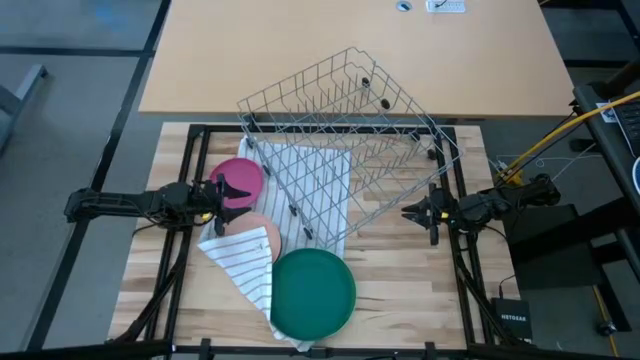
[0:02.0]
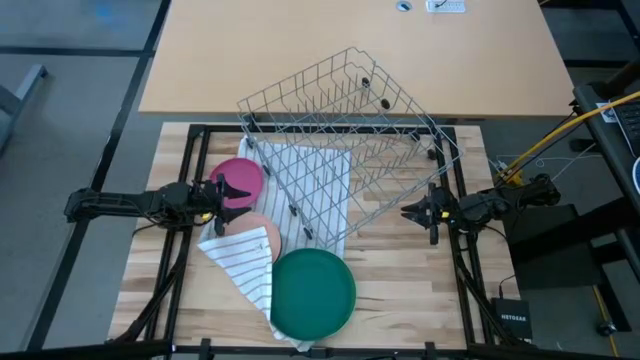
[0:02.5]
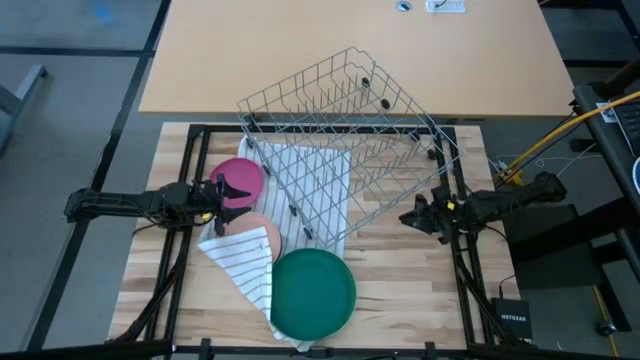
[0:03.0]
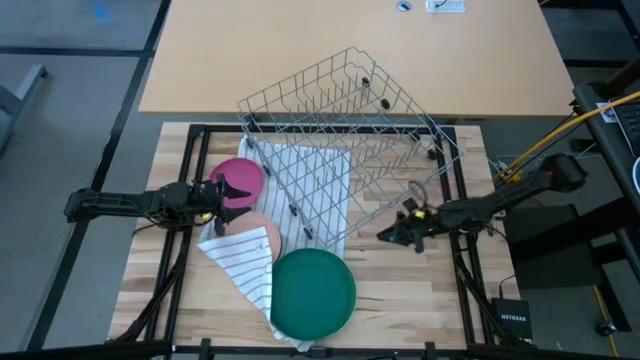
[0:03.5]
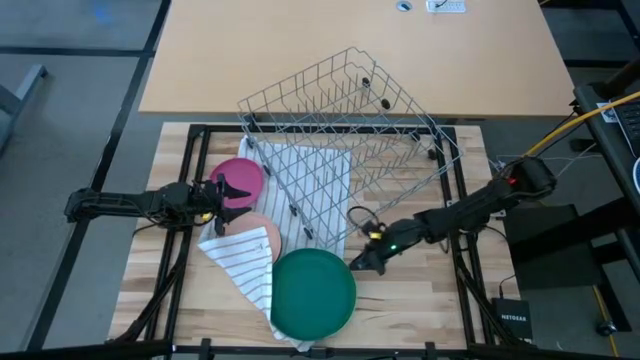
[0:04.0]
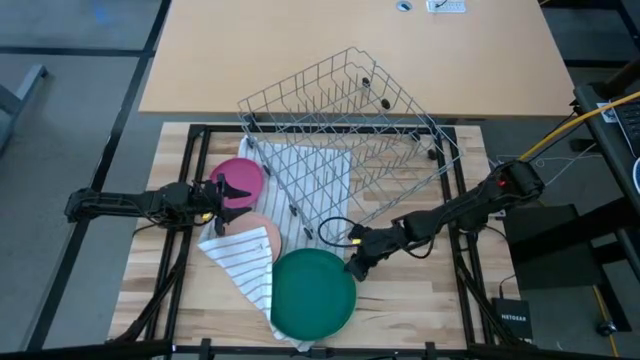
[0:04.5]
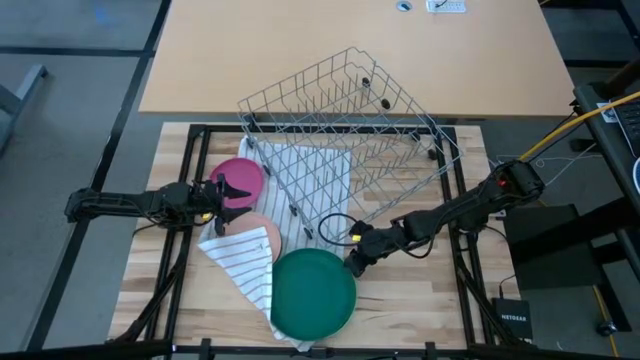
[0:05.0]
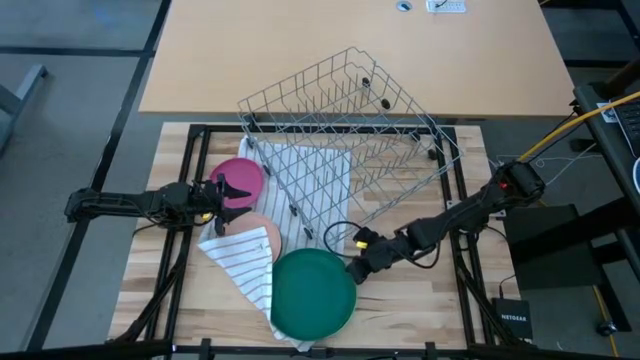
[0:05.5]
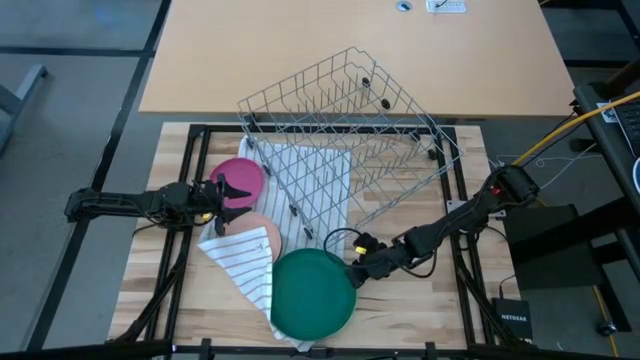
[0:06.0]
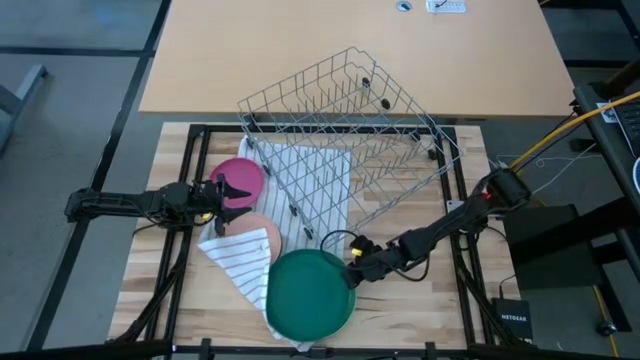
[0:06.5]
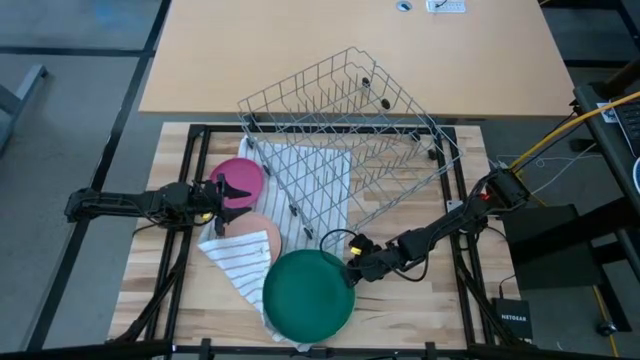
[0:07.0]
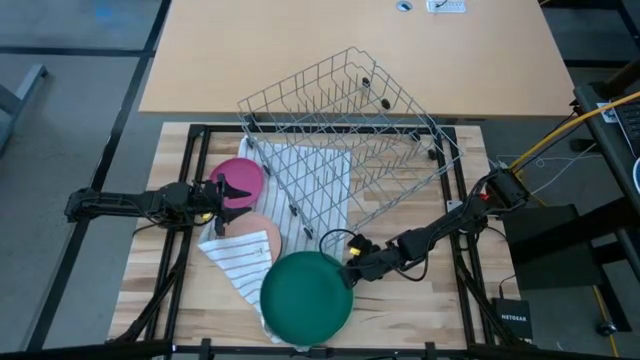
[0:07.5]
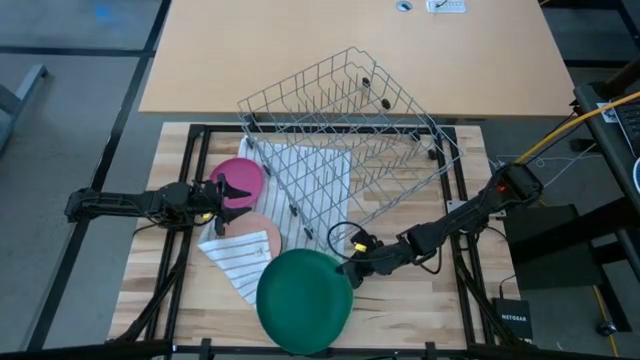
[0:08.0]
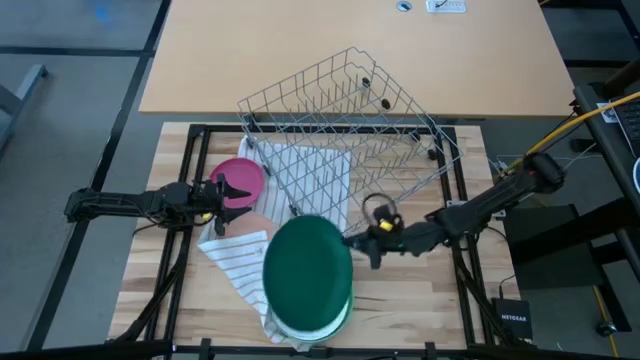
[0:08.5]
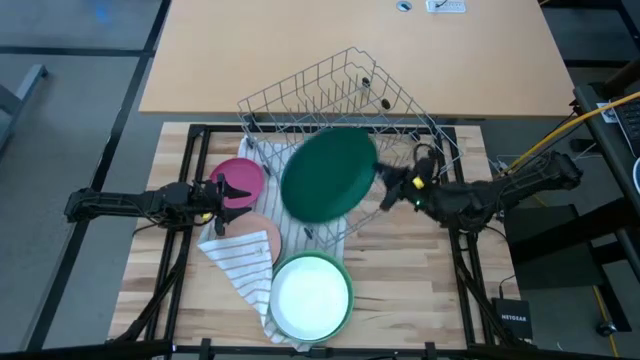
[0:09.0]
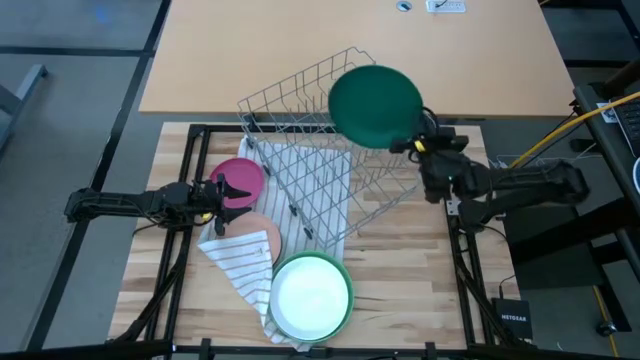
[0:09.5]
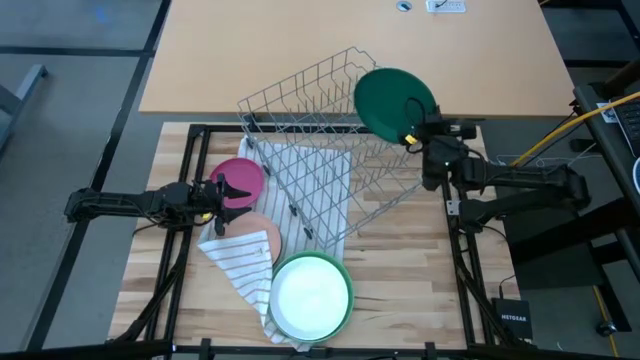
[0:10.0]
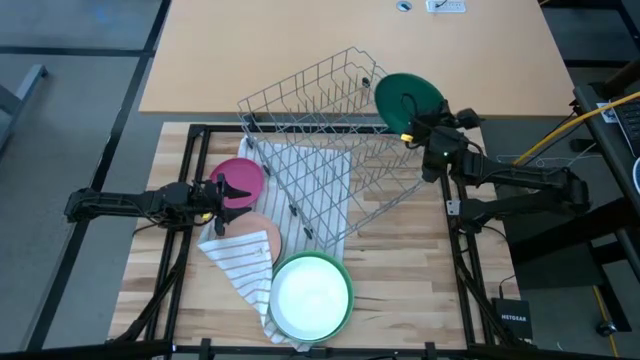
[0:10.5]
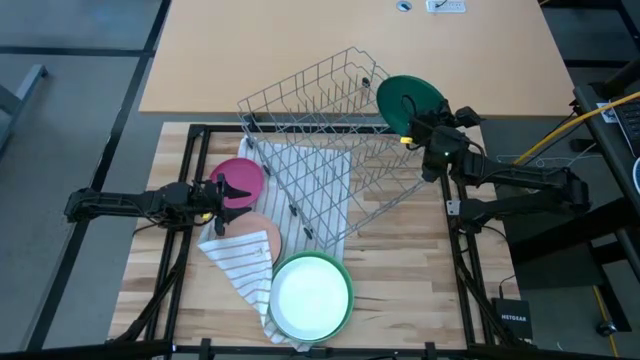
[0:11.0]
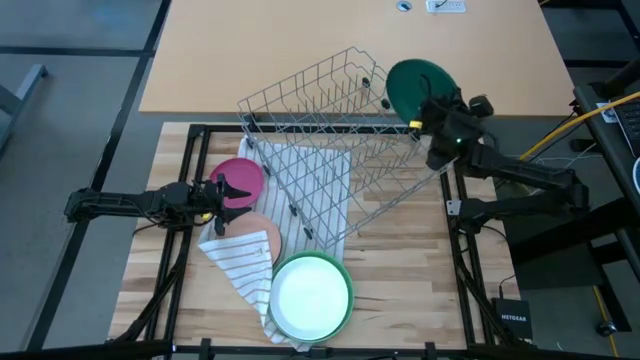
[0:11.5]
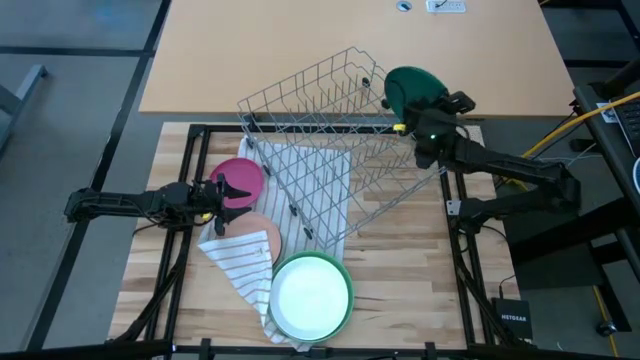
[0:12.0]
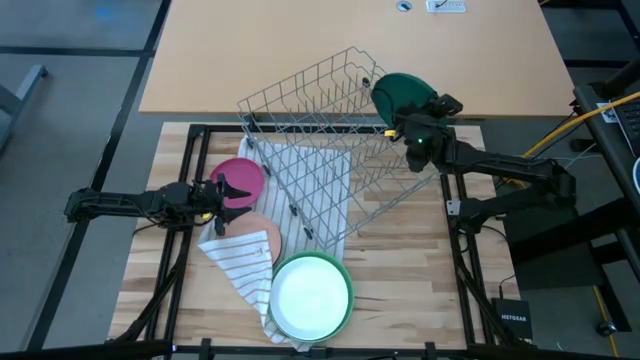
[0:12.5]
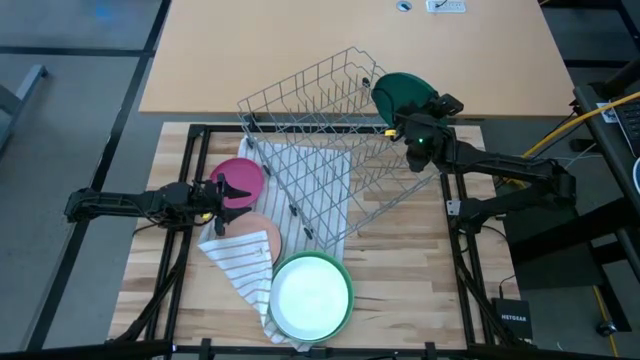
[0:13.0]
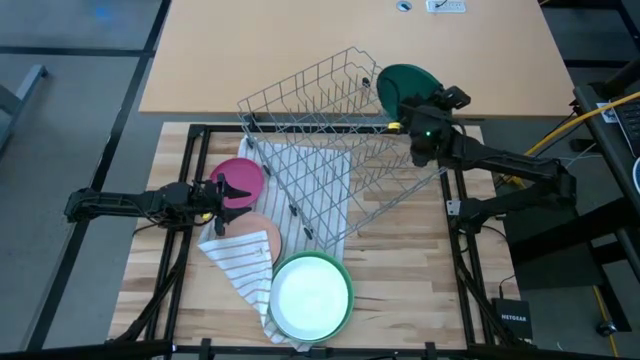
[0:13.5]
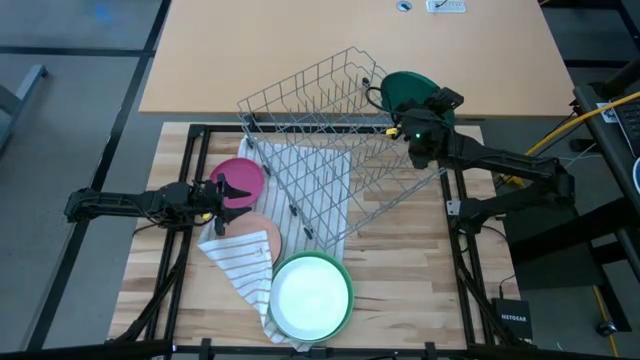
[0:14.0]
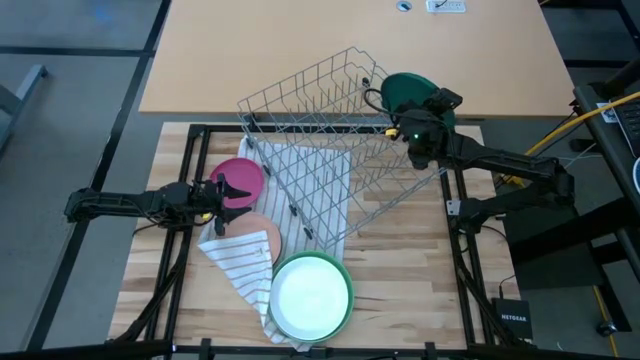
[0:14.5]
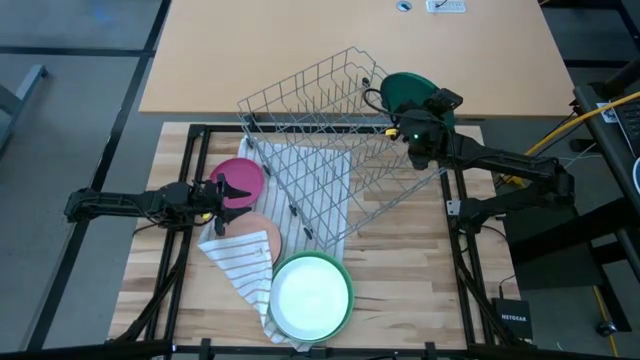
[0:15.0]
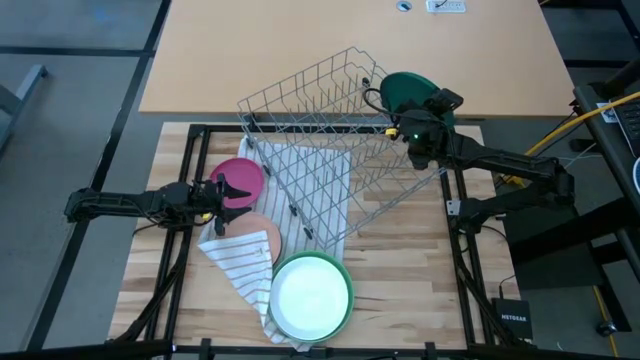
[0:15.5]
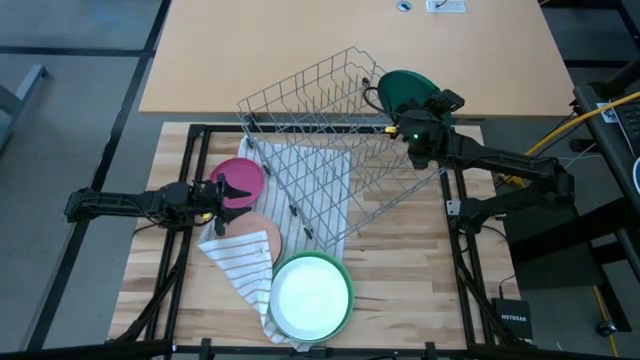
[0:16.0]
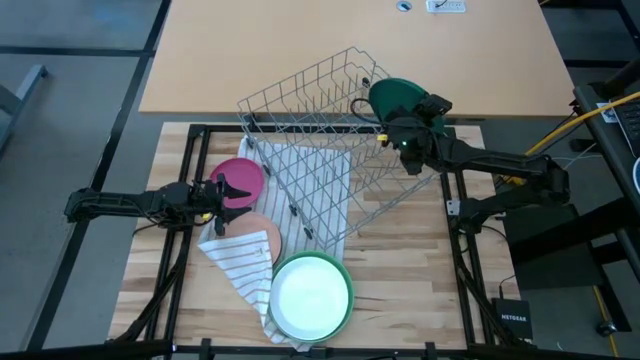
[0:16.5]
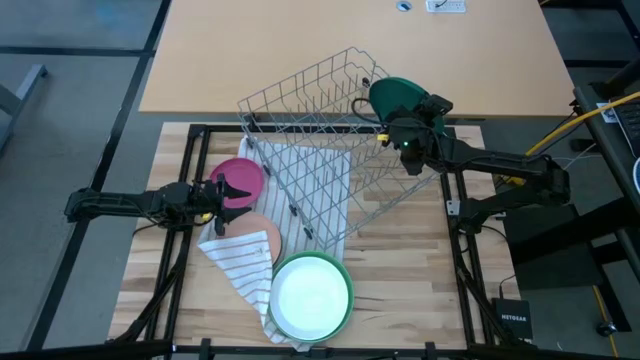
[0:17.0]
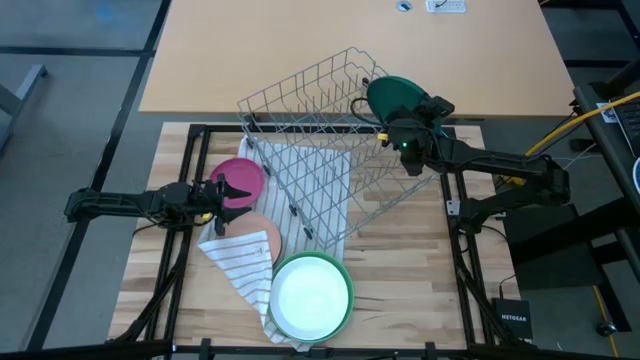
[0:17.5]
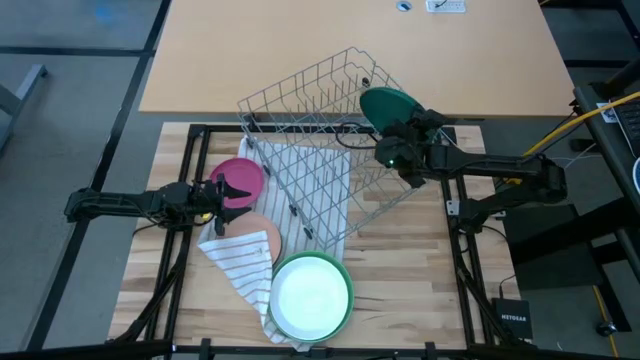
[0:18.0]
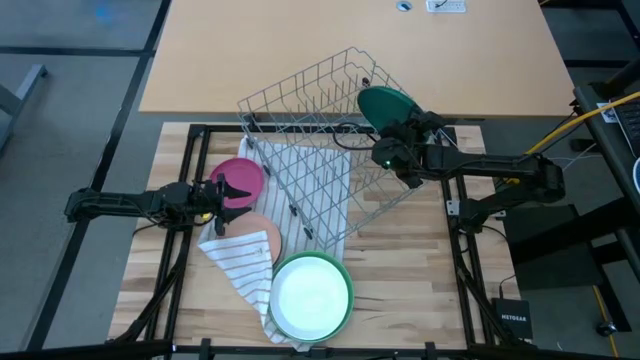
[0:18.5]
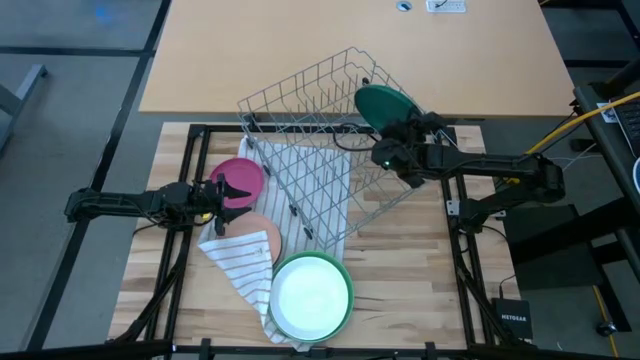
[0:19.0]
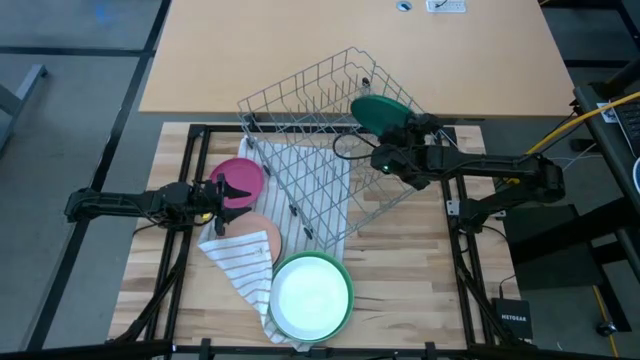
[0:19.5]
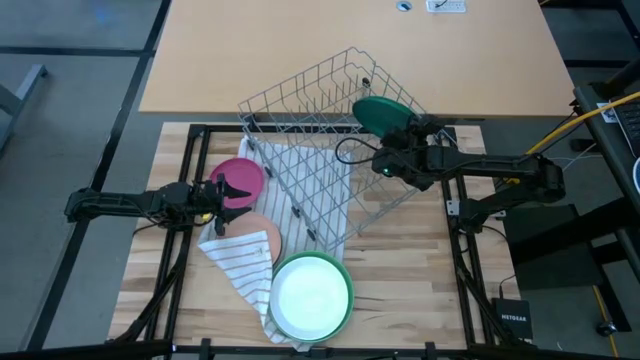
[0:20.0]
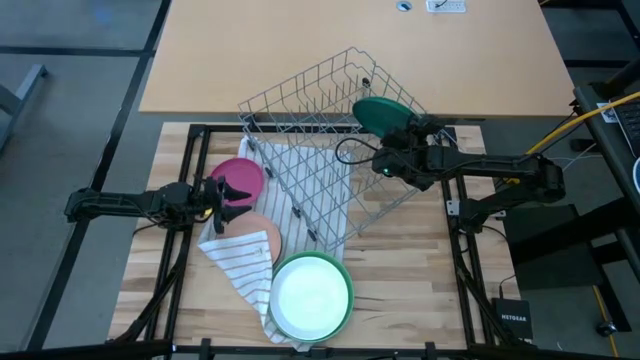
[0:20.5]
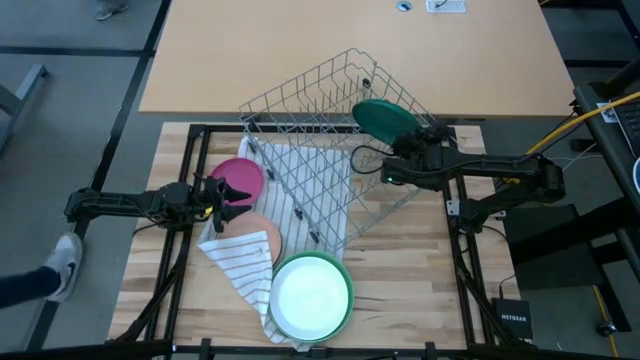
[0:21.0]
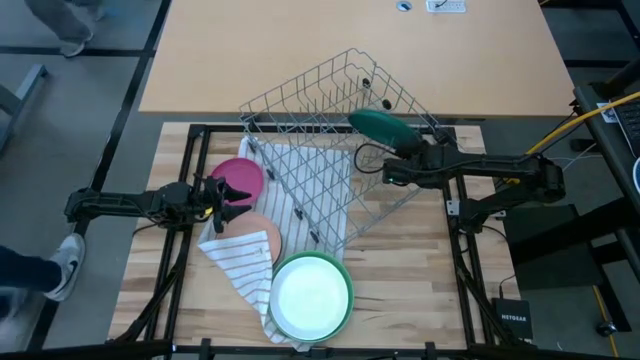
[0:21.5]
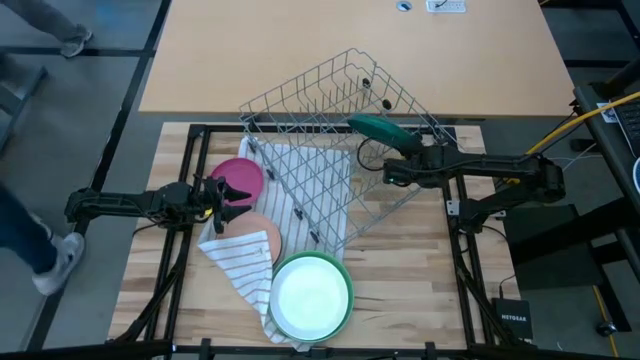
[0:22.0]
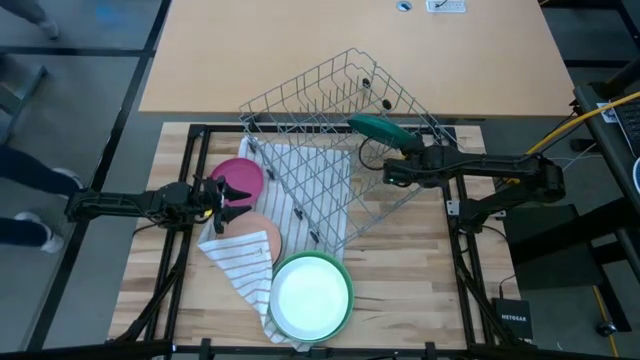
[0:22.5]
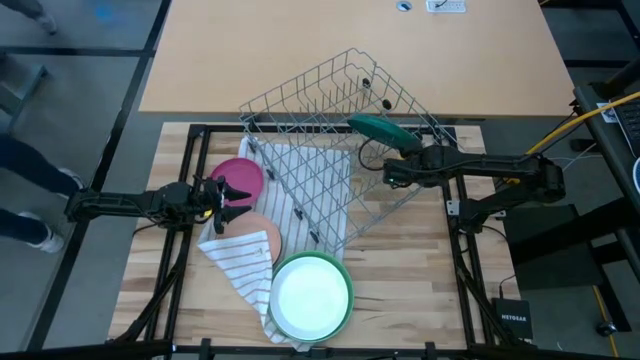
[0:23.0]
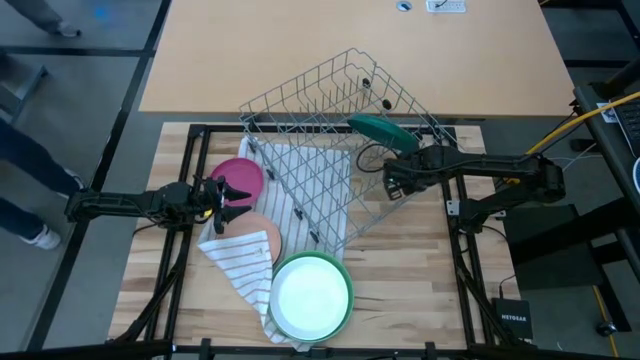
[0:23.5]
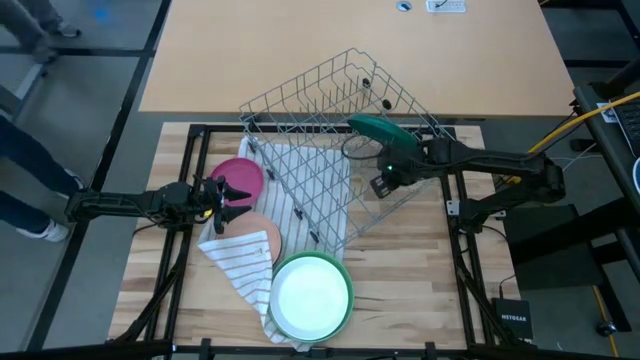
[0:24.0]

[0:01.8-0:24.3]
Task: Sort dishes
Put the top dark green plate in the dish rack
